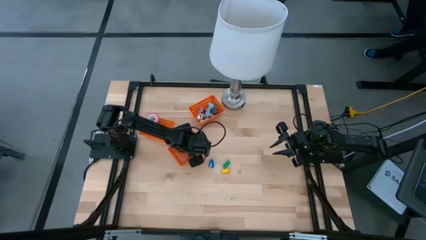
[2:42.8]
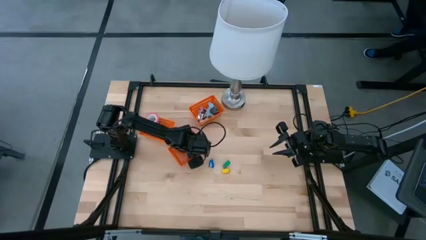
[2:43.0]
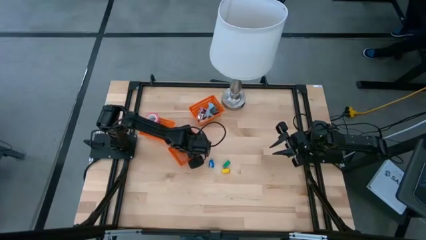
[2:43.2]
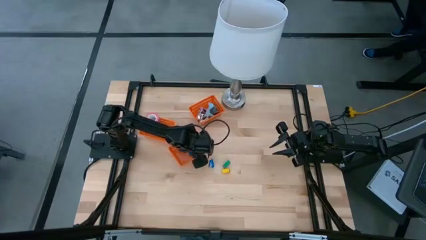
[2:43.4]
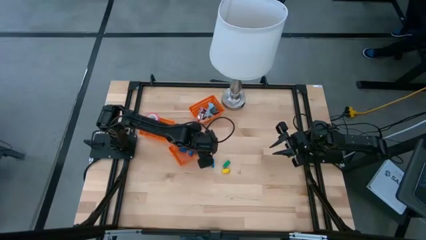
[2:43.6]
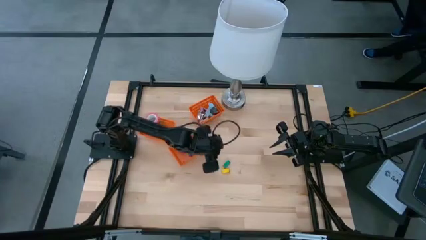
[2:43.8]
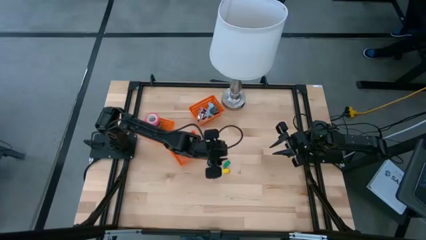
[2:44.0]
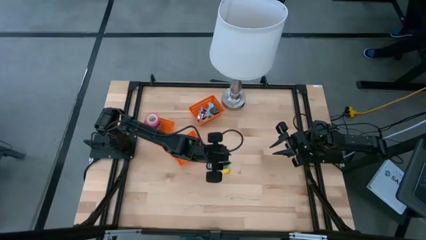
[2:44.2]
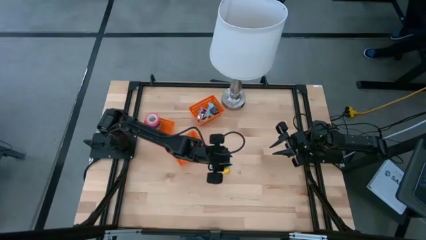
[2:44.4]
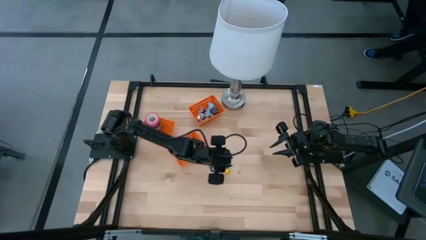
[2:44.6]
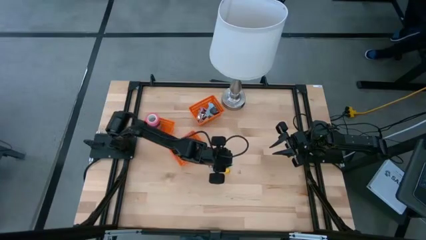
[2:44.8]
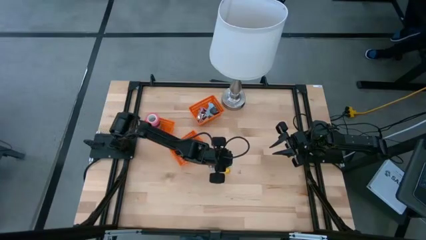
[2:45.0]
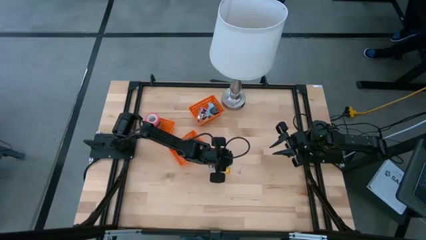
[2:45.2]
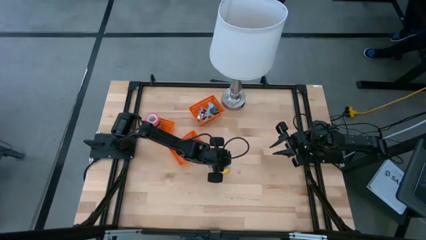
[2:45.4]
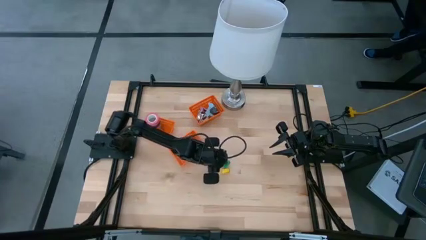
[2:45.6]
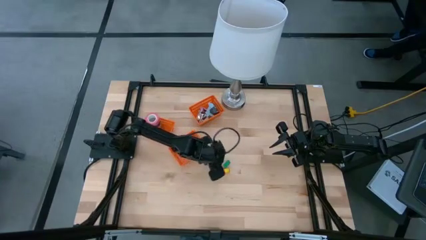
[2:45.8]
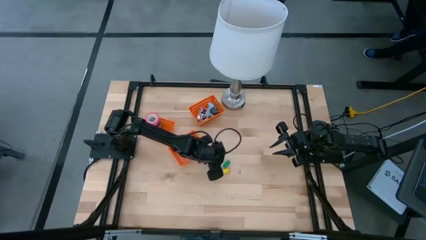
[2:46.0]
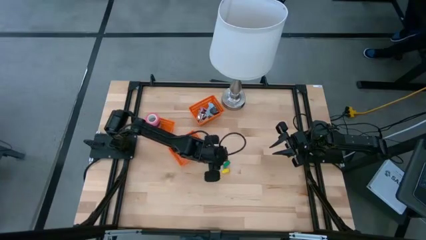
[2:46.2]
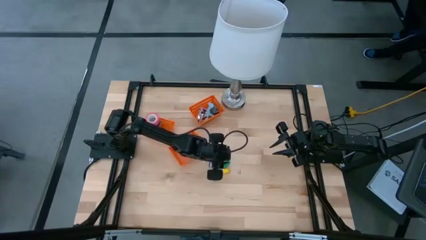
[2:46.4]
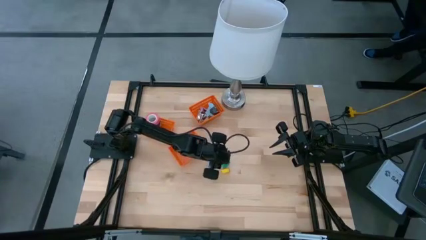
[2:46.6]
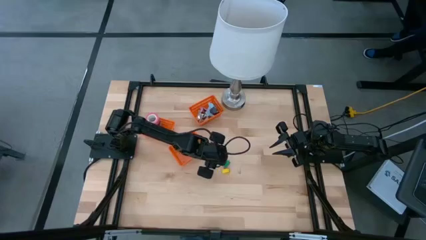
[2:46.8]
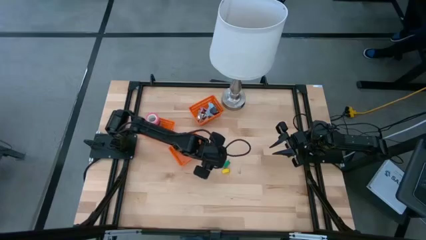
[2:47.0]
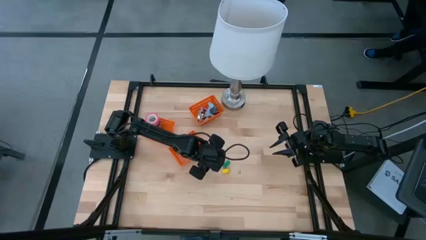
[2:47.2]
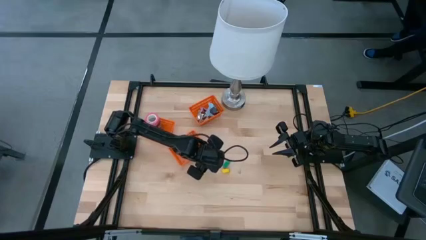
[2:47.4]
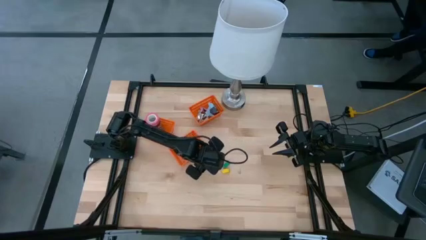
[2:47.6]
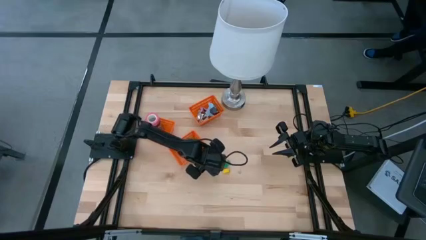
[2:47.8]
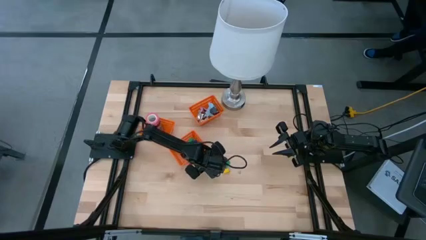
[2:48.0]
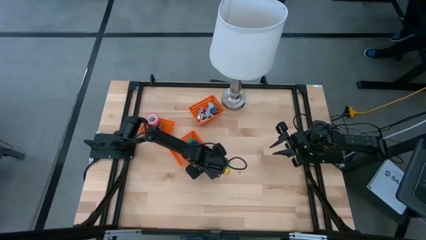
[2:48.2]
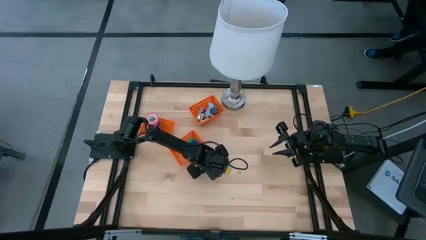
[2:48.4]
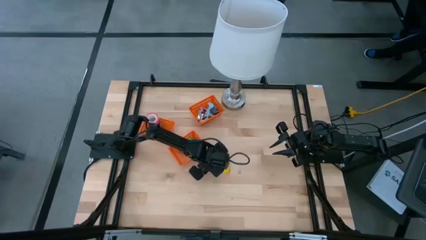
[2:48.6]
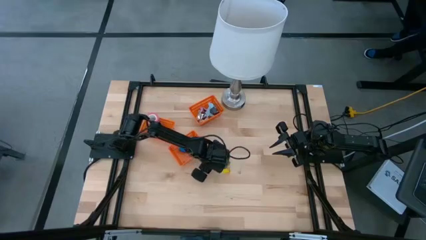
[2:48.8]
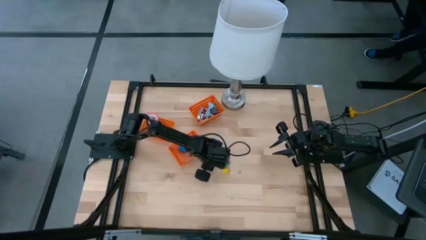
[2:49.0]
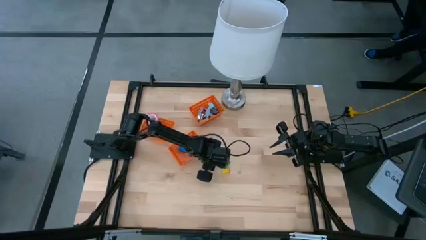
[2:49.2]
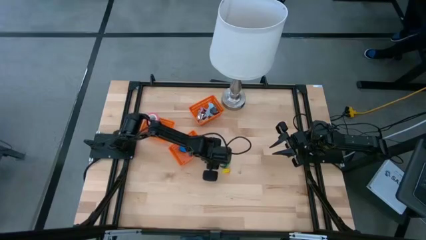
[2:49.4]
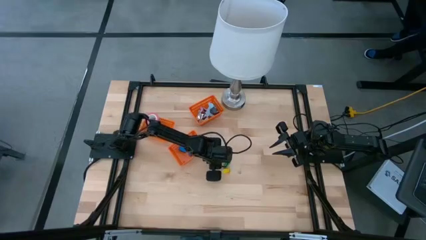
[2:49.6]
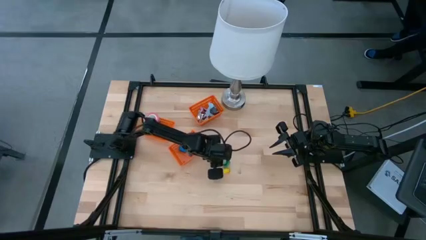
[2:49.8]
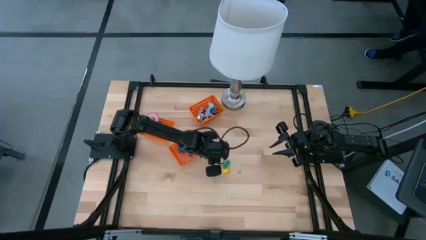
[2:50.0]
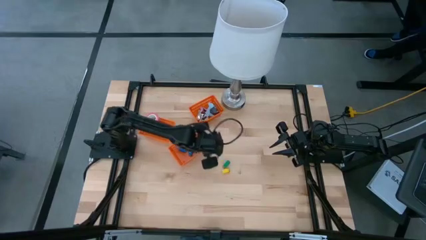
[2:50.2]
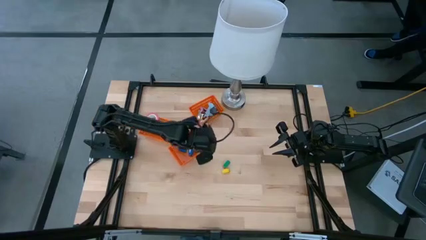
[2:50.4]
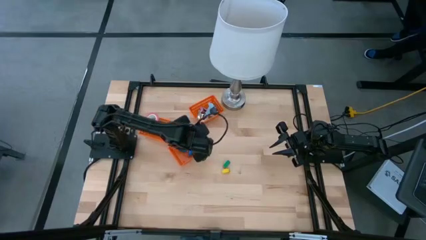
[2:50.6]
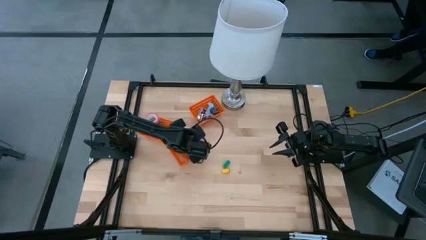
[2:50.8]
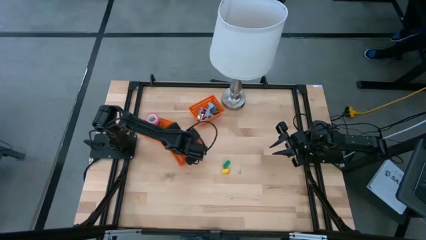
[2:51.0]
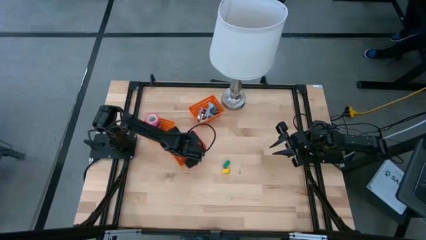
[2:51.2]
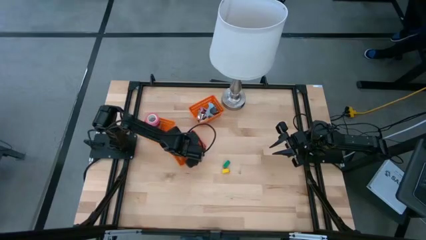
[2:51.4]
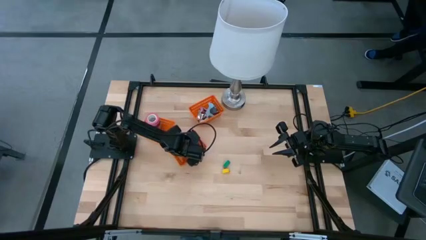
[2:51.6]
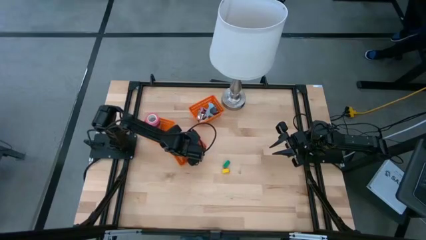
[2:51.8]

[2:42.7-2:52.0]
Task: Pick and place Stapler, Stapler remover, tape
Put the blue stapler into the bottom orange bin

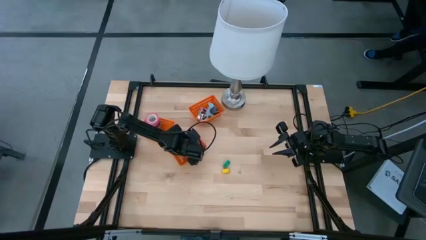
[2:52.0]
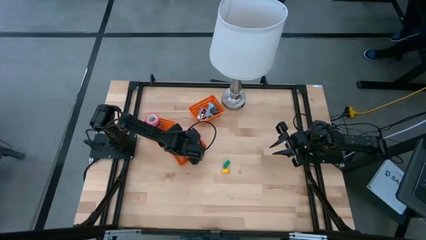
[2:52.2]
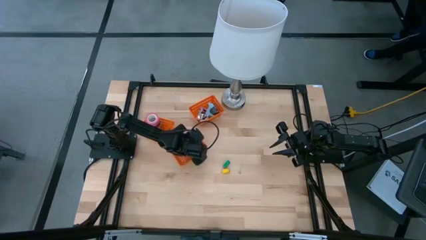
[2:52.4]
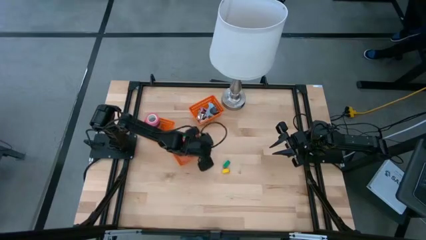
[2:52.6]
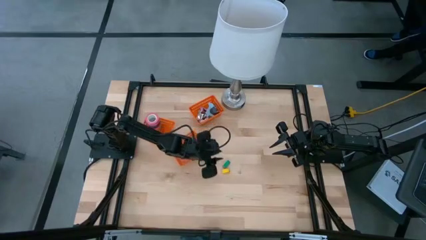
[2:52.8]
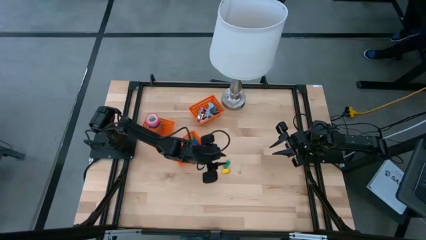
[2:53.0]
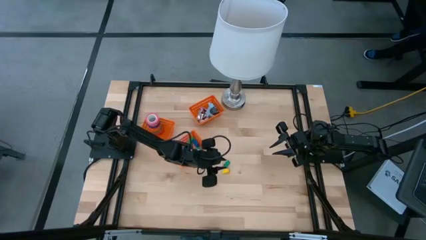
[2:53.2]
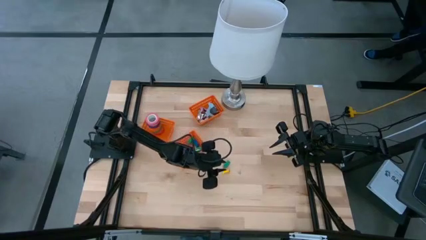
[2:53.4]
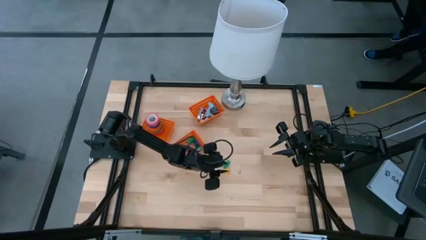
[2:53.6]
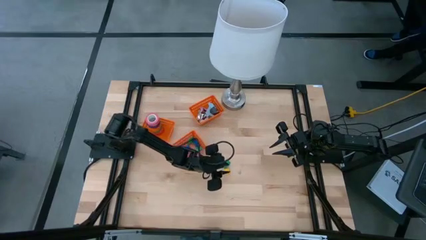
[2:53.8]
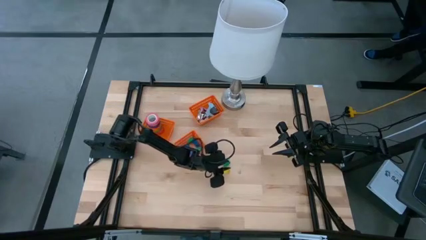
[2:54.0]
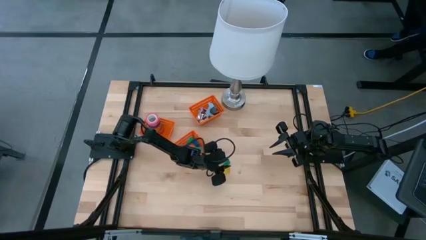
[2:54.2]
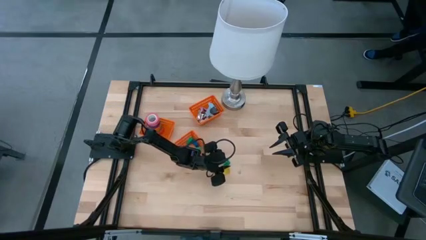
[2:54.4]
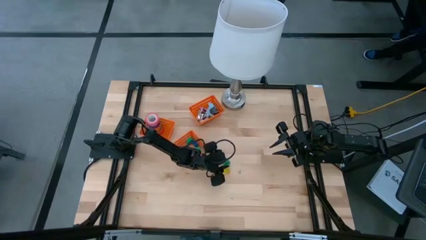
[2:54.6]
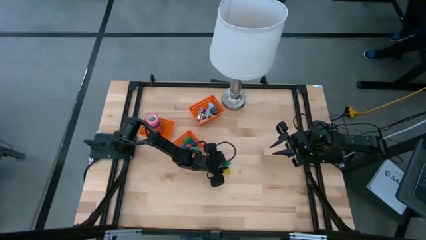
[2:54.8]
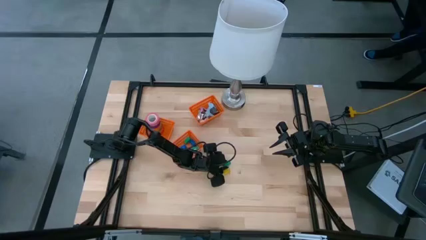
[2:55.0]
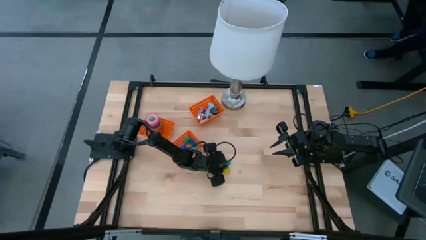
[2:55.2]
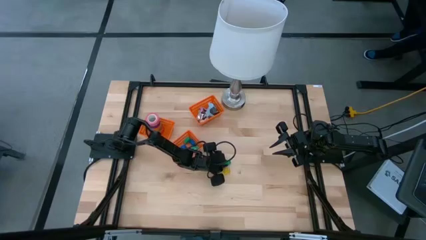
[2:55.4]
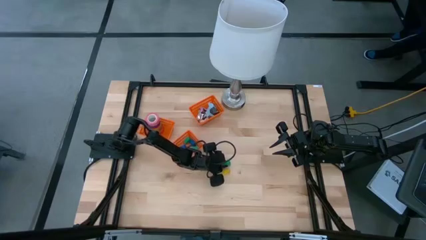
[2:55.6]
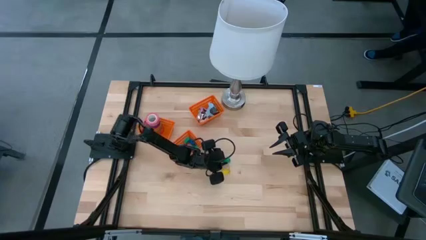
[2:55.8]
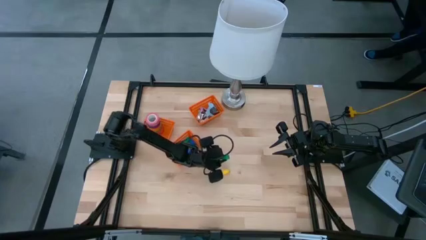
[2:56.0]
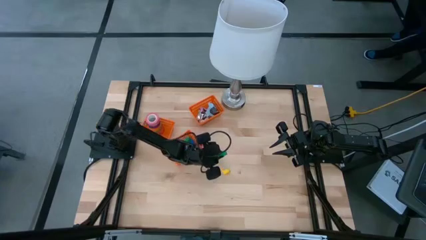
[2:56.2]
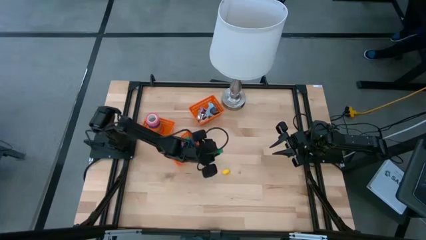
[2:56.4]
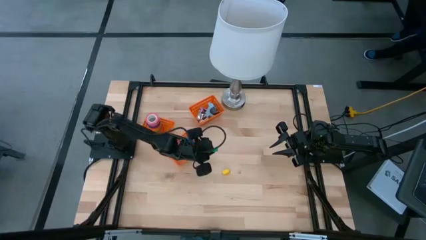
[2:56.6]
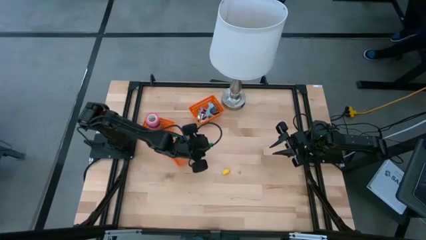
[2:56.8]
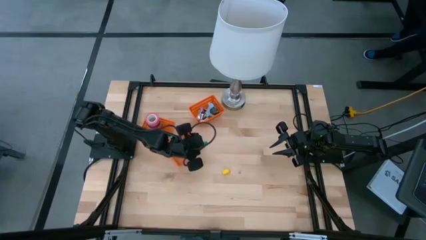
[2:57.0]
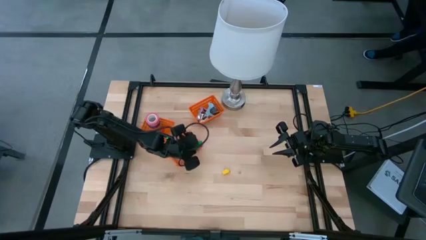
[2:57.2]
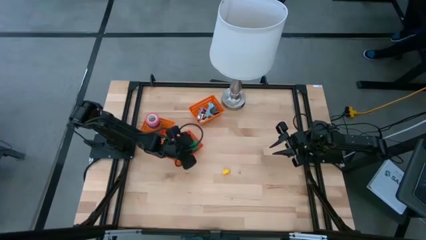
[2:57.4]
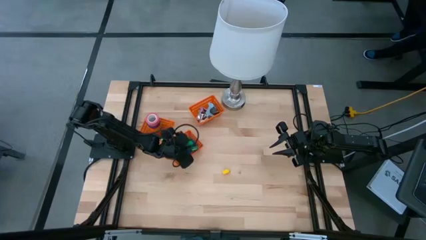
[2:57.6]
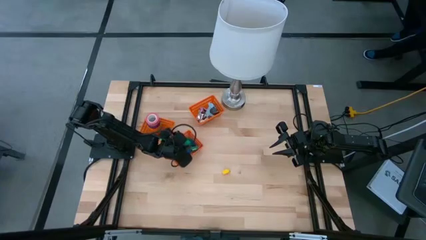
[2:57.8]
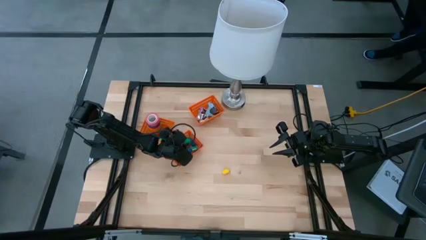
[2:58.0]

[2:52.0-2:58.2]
Put the green stapler into the bottom orange bin

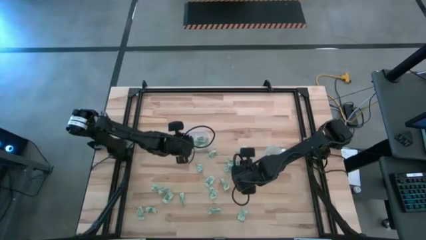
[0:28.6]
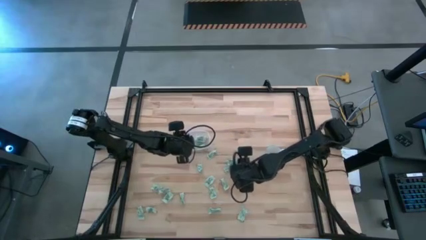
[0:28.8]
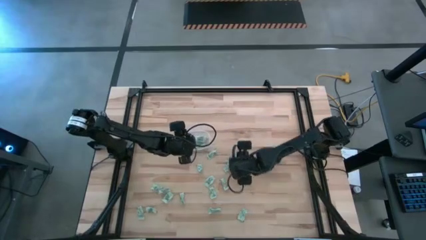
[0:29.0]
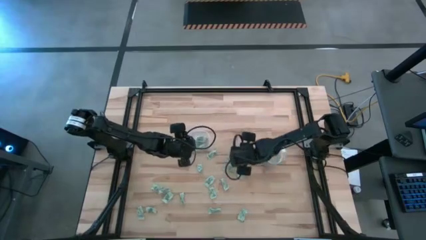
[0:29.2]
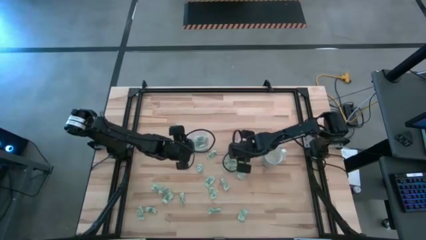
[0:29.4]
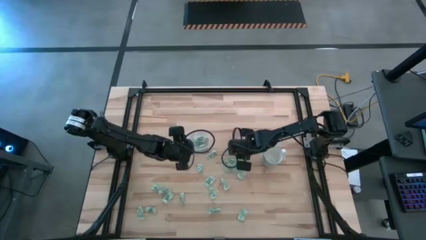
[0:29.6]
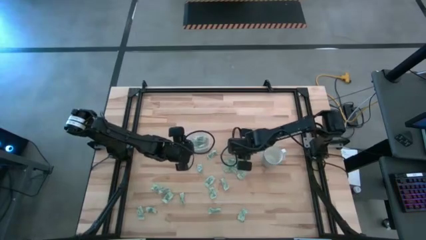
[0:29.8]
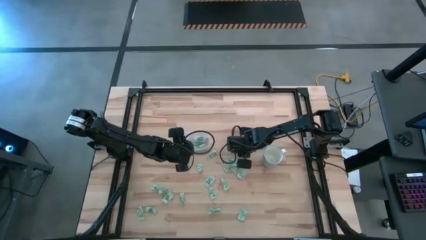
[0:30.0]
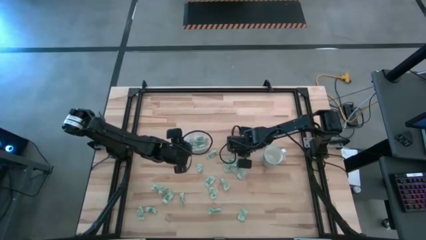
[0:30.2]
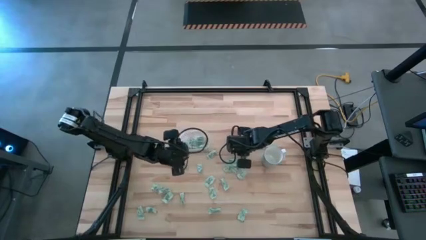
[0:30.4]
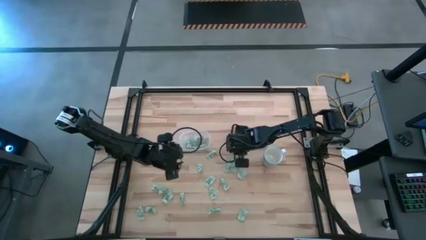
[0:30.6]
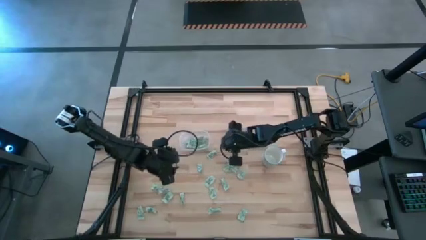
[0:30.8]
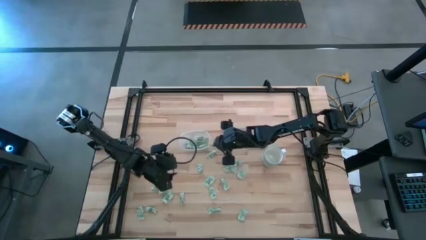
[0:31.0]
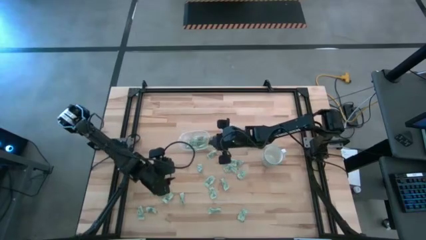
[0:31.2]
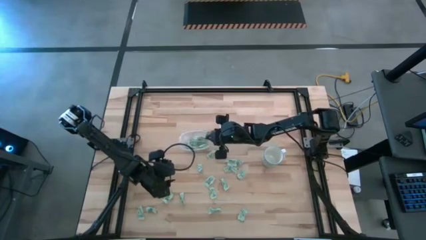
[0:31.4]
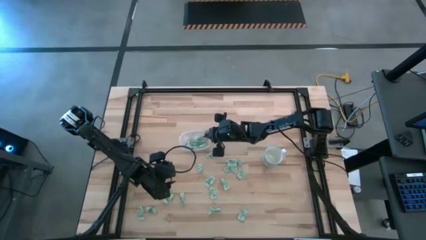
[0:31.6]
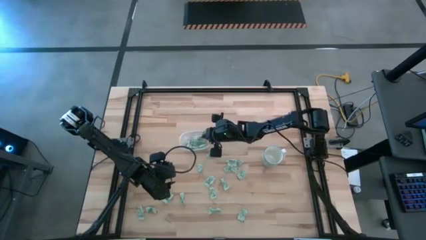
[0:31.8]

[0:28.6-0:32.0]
Task: Pick and place Stevia / Truvia into bins
Put the stevia packet into the transparent bin
